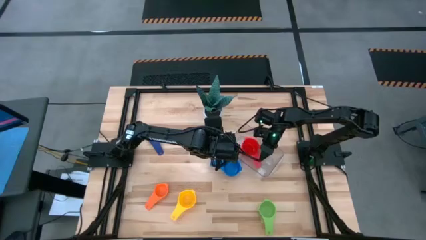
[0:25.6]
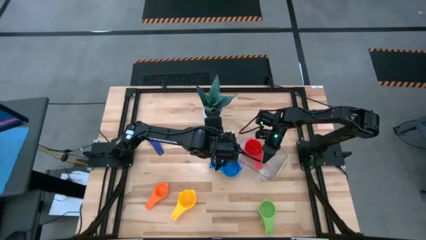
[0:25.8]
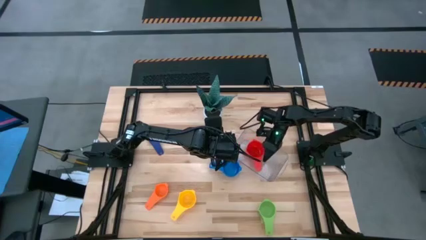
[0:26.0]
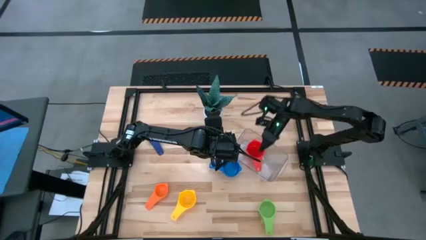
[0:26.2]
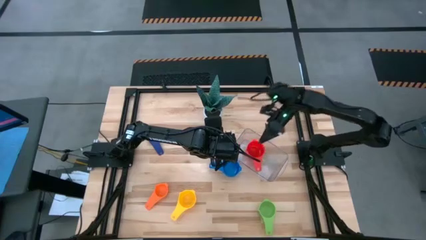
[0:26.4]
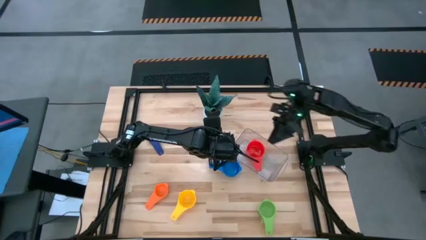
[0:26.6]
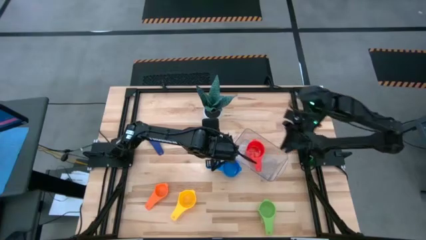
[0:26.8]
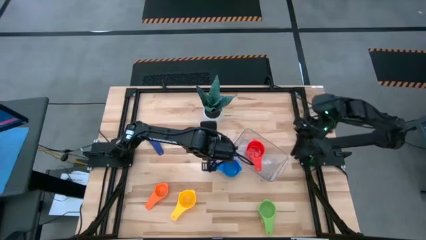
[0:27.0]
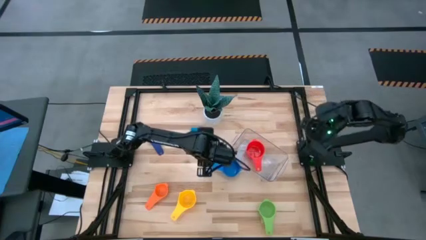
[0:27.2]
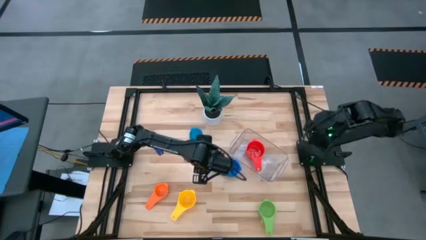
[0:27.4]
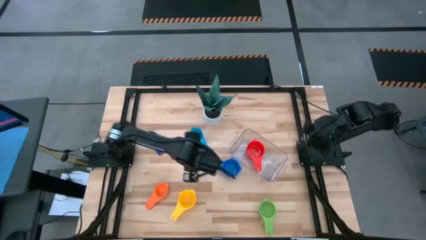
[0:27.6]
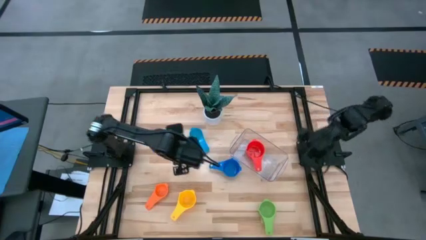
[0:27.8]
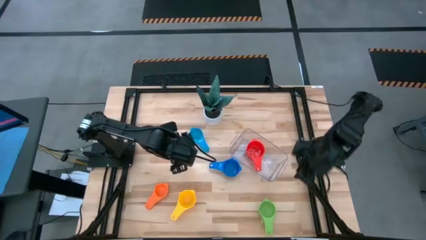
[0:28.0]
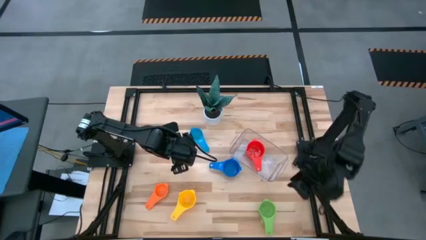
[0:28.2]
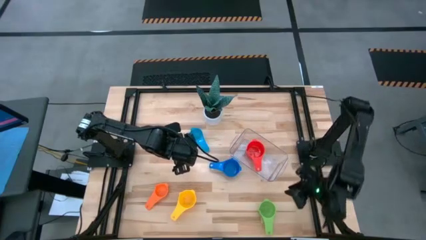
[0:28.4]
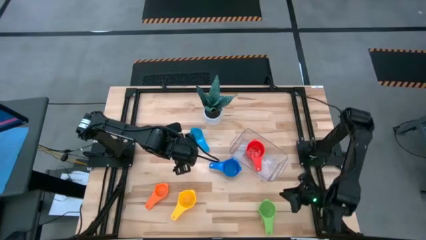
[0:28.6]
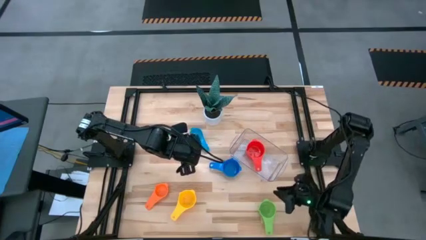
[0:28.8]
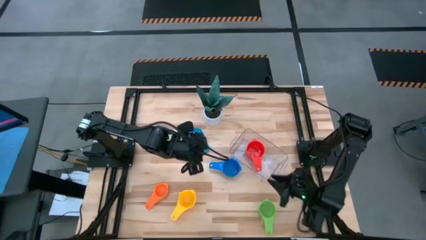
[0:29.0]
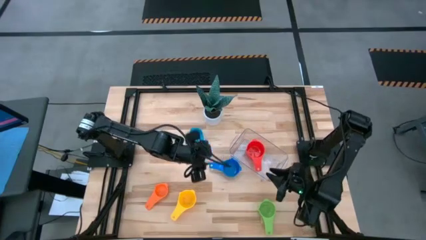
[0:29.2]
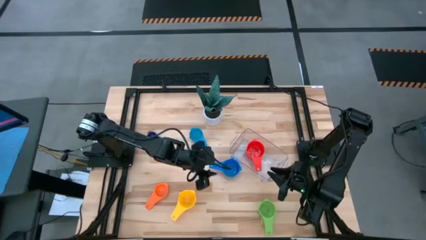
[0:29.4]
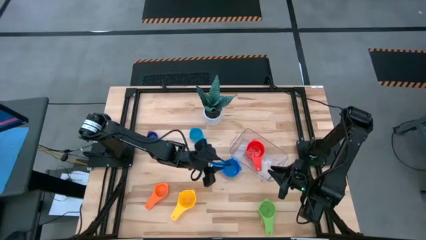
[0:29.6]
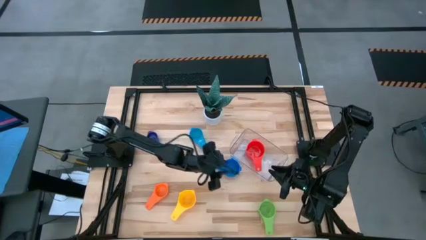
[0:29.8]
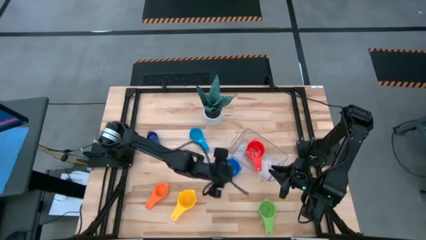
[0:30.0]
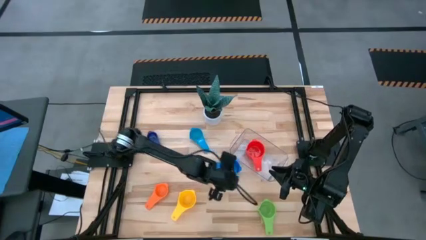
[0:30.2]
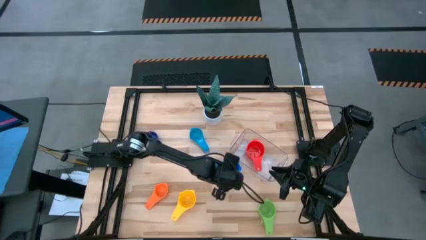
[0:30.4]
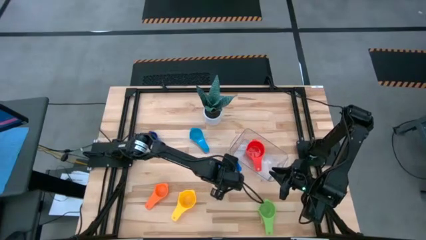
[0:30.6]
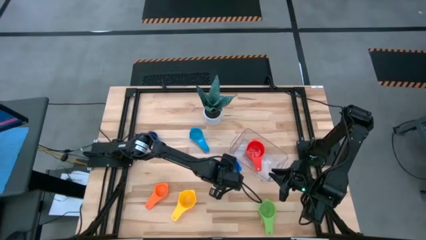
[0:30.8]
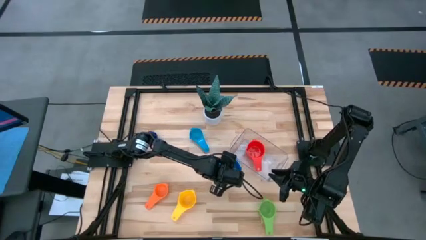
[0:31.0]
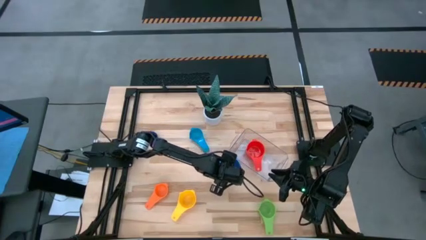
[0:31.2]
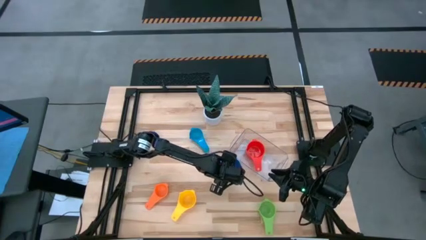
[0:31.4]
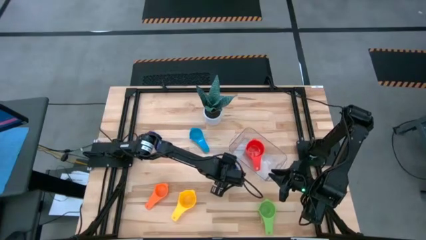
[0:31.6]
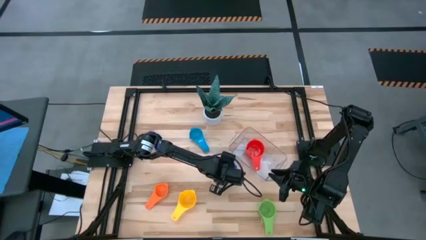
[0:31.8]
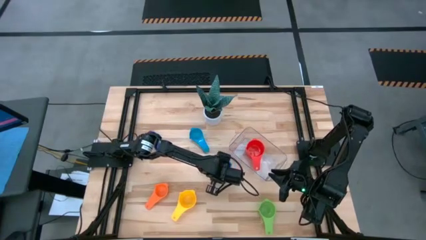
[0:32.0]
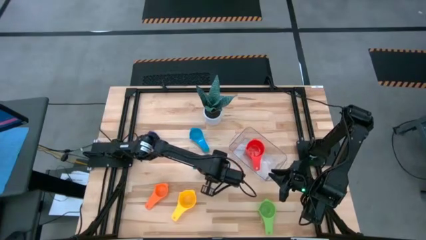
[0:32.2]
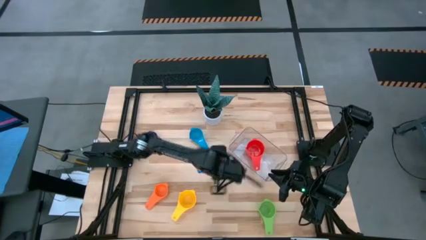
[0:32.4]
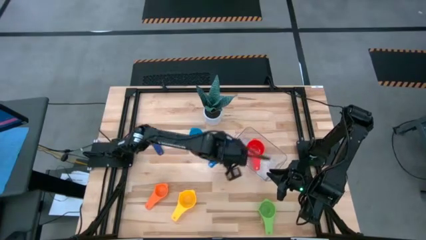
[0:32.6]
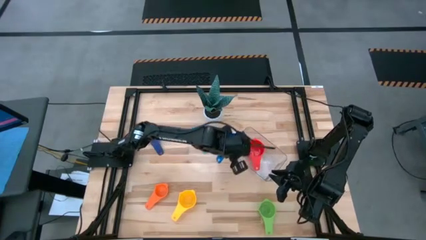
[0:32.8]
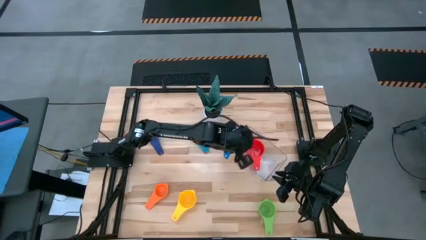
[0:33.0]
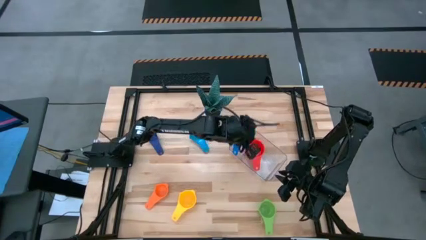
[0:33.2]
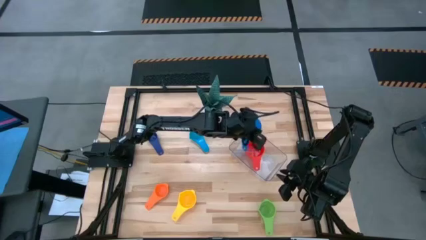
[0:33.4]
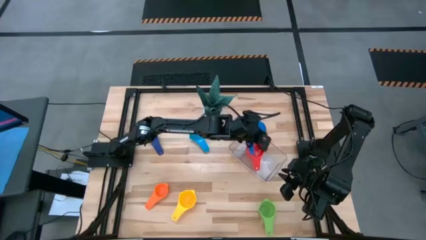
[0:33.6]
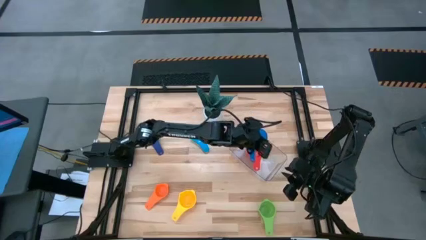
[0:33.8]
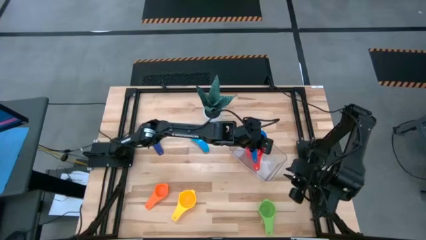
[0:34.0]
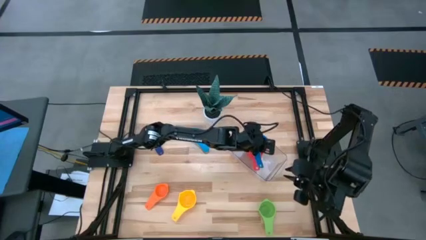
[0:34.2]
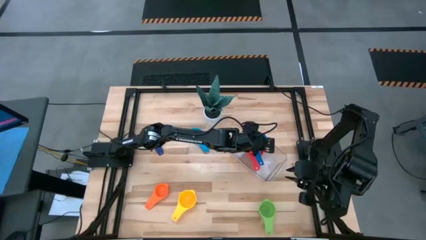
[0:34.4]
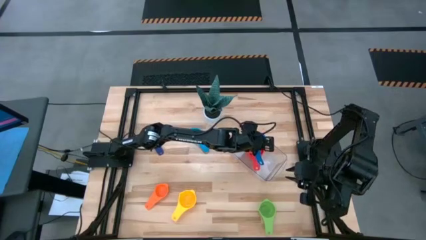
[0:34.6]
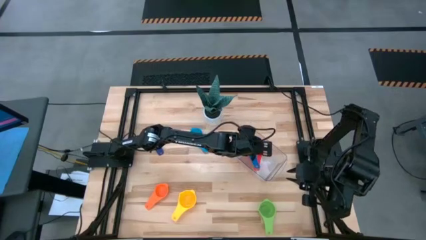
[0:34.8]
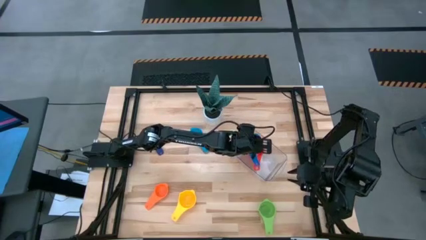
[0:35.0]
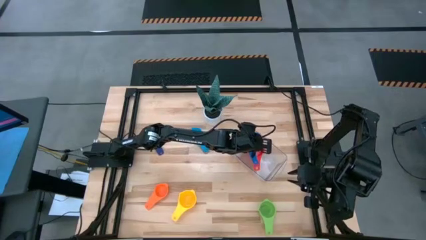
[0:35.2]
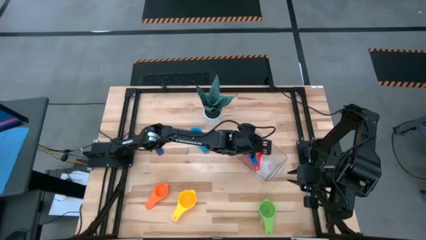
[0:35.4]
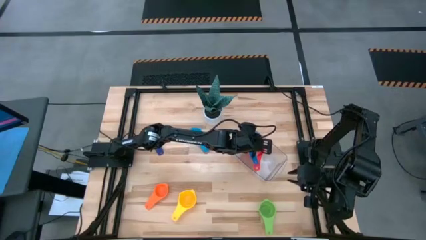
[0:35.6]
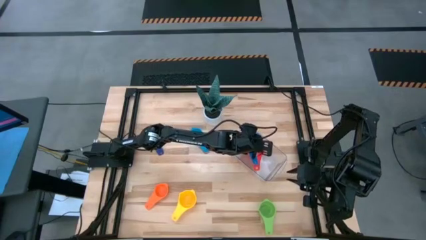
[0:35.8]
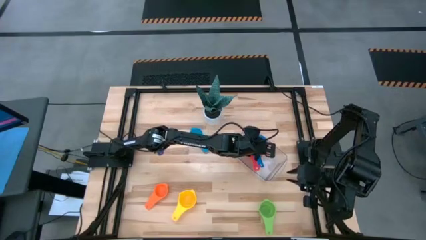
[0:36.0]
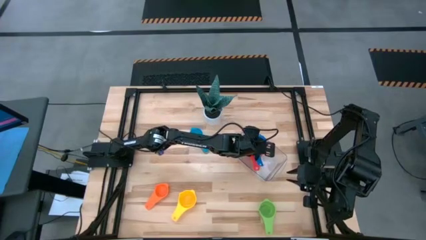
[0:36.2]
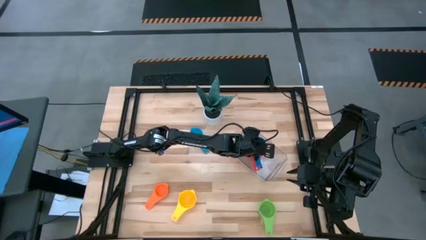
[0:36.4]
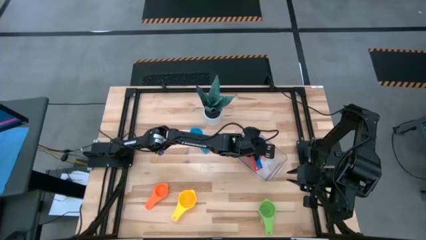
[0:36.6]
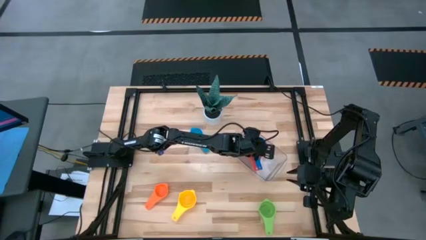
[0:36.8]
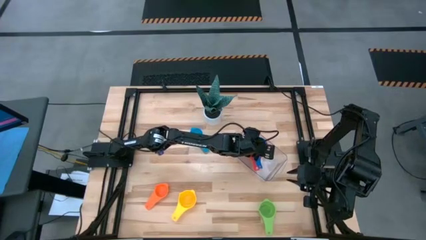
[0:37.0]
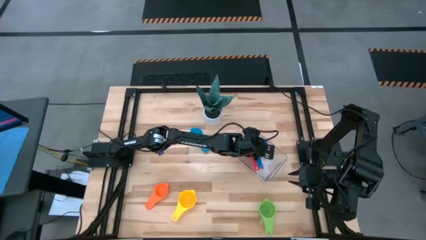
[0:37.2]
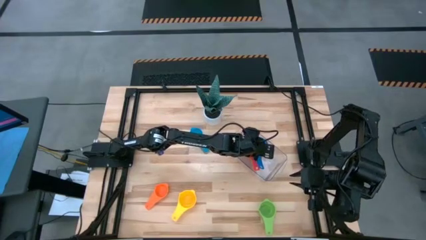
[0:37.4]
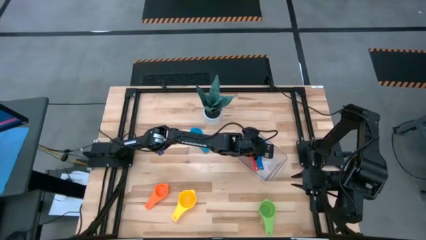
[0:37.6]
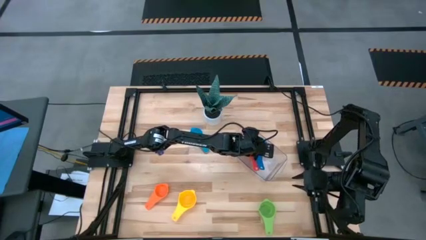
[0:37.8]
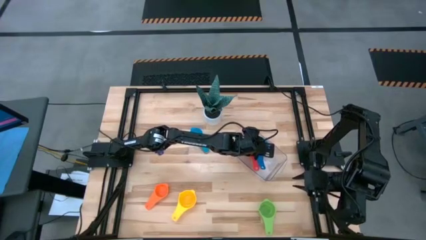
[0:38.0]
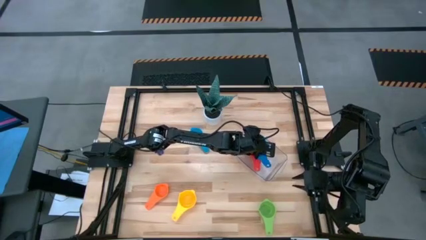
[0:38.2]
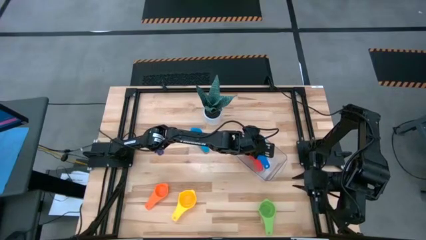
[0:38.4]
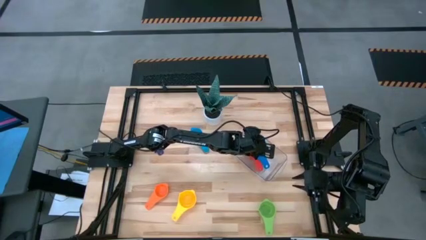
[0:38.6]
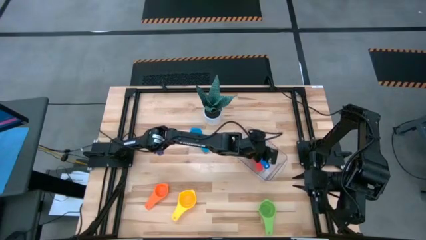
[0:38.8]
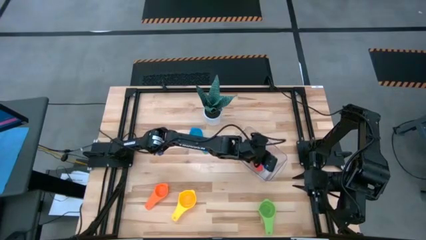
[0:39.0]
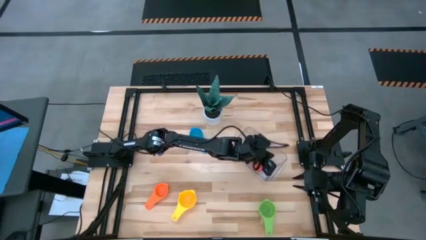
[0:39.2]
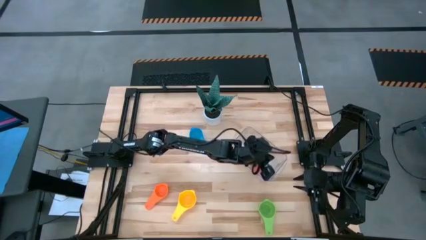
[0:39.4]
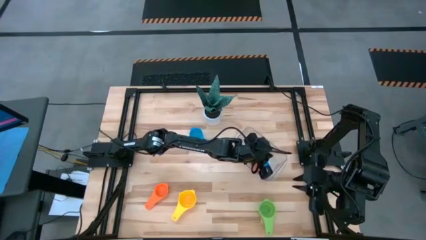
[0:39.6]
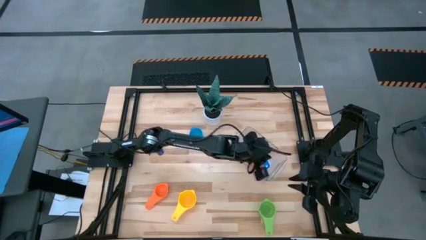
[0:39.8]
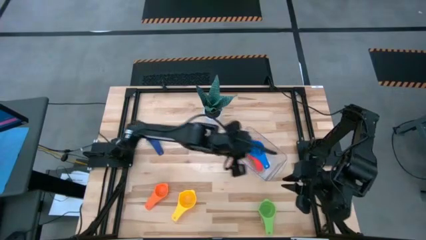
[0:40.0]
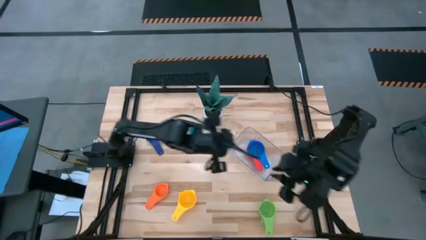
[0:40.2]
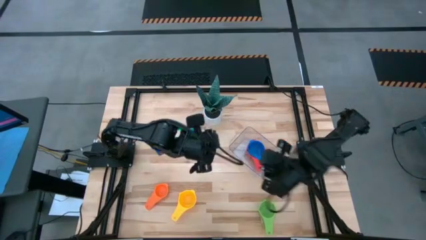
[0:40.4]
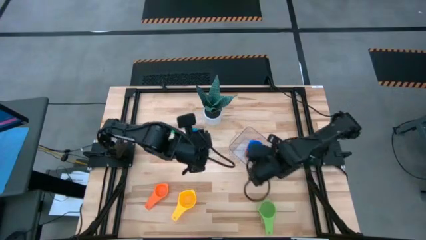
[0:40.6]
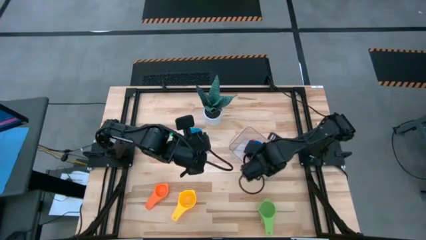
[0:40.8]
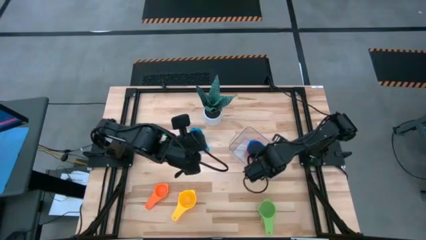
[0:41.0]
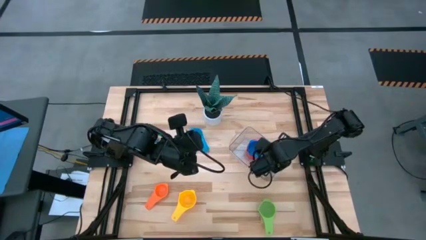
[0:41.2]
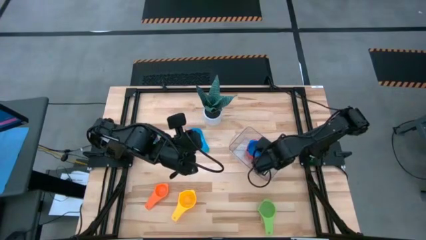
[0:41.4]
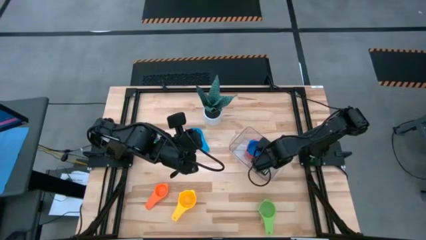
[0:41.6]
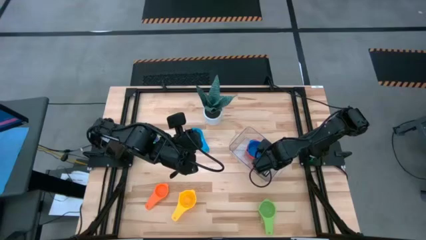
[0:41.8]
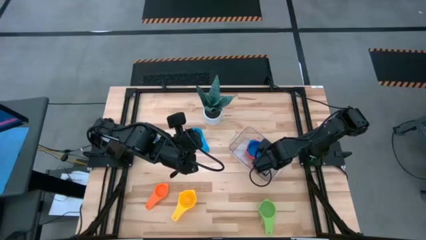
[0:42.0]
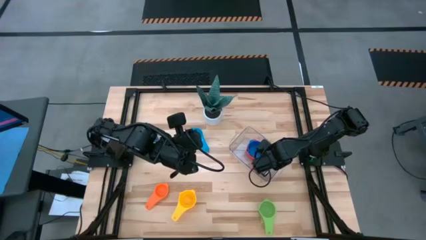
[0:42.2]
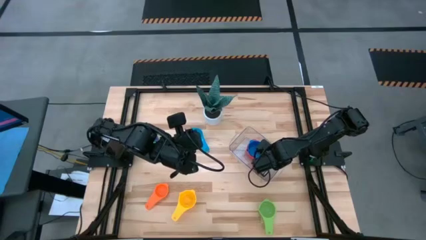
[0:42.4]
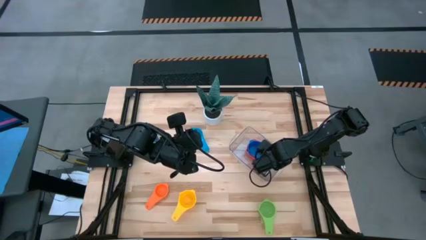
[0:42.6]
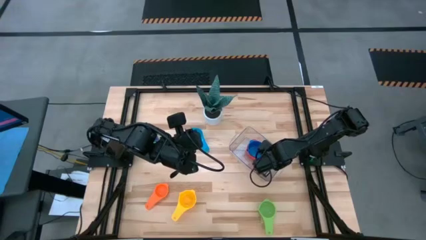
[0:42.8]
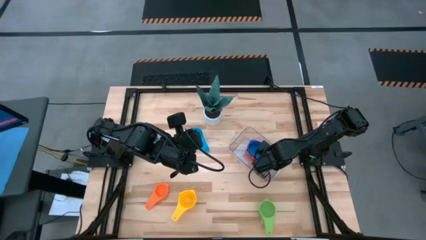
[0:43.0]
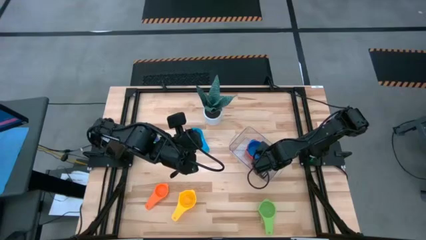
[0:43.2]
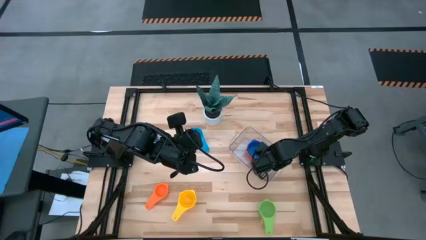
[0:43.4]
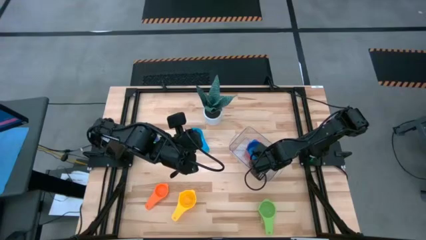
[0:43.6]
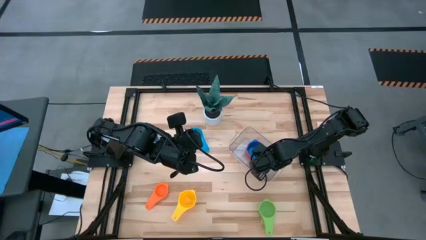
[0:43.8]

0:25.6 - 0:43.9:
Task: Nest measuring cups in basket
Stack the blue measuring cup on top of the red measuring cup
